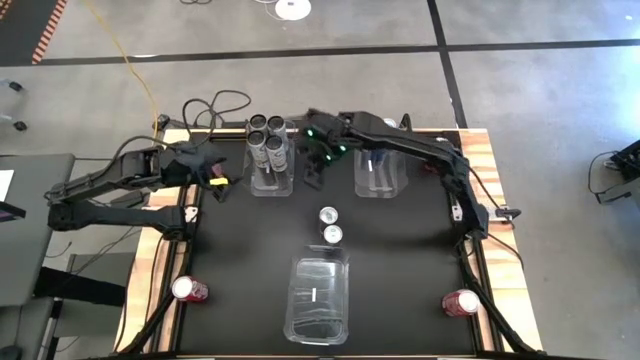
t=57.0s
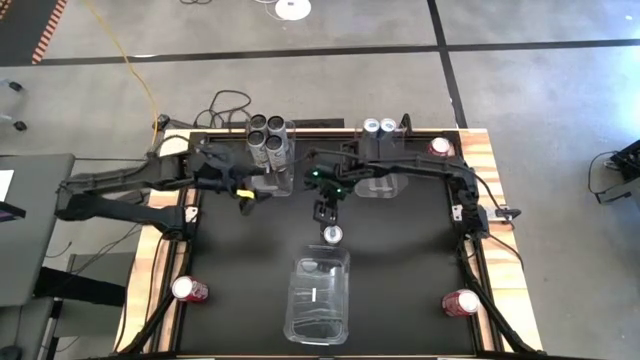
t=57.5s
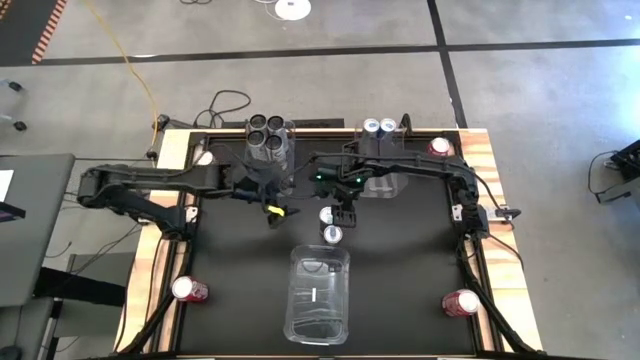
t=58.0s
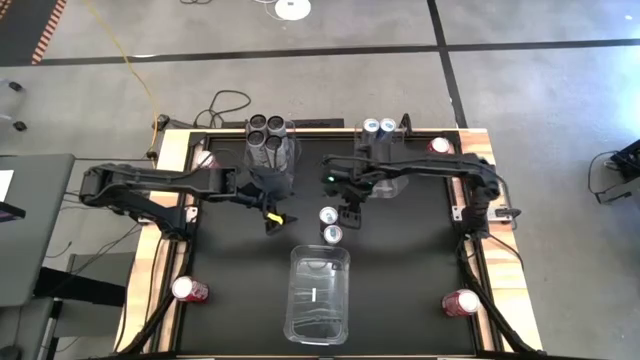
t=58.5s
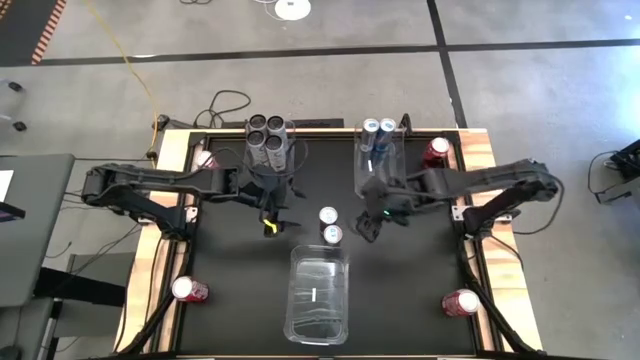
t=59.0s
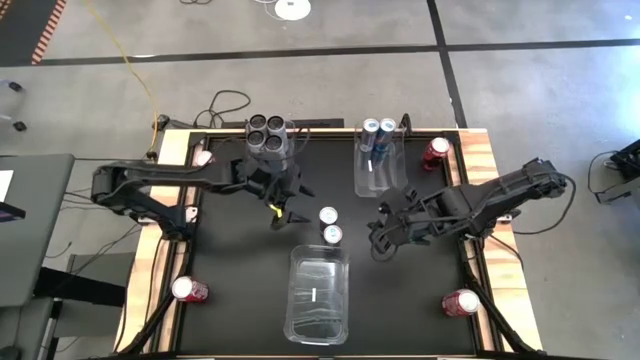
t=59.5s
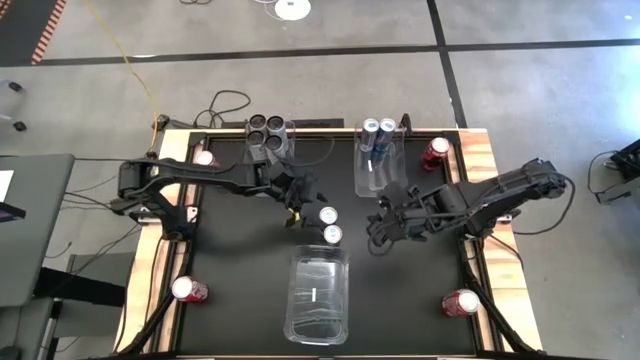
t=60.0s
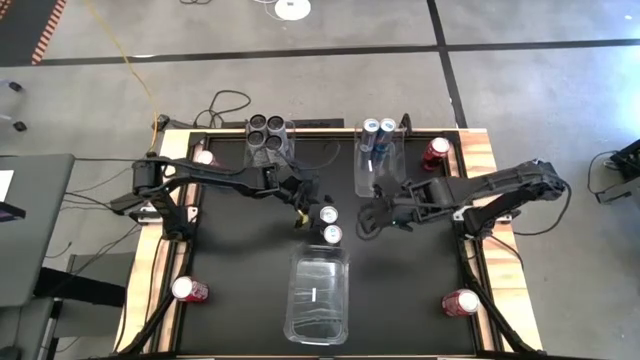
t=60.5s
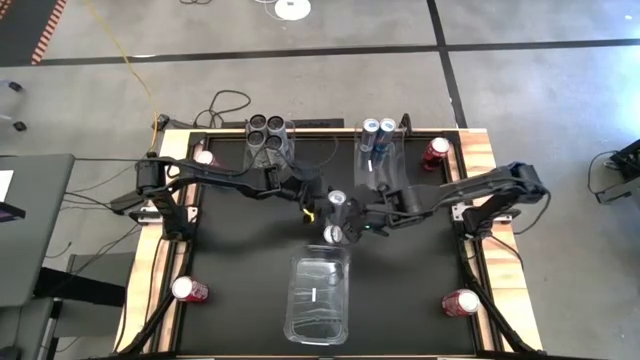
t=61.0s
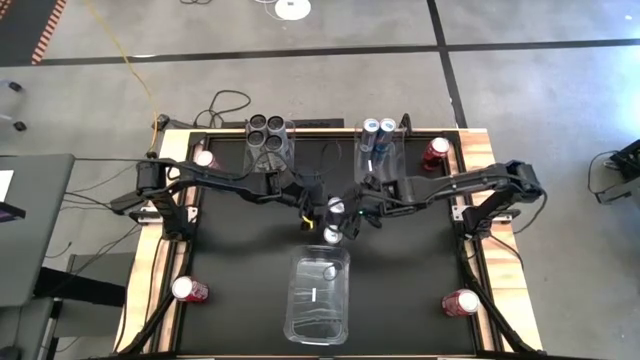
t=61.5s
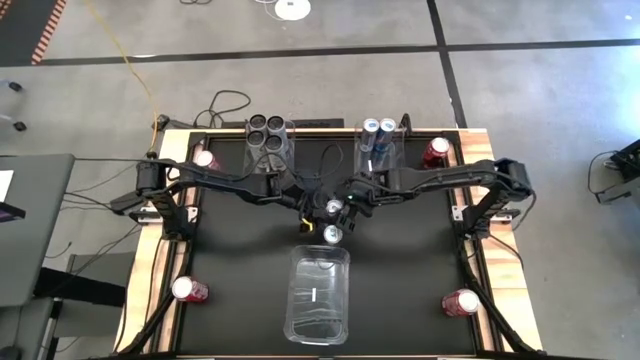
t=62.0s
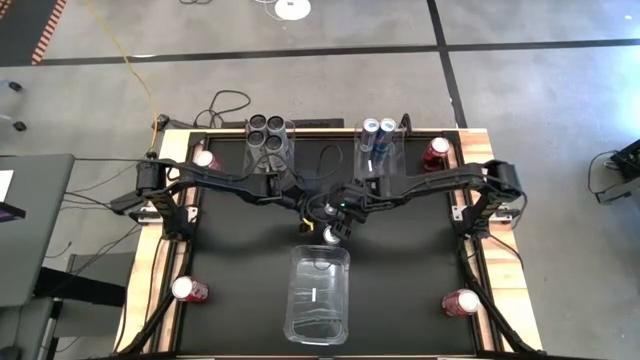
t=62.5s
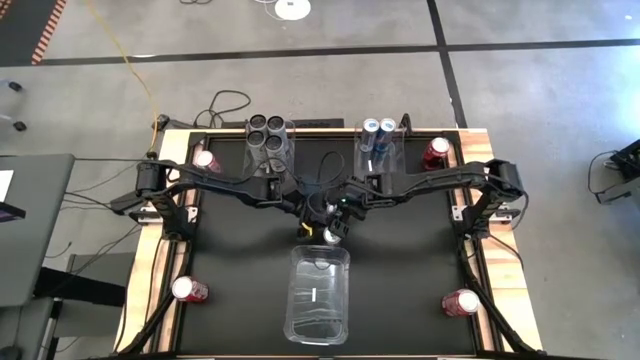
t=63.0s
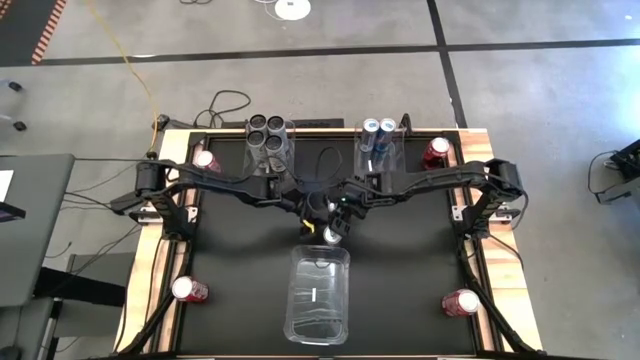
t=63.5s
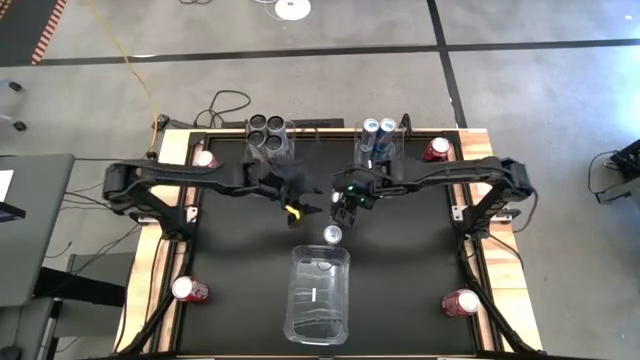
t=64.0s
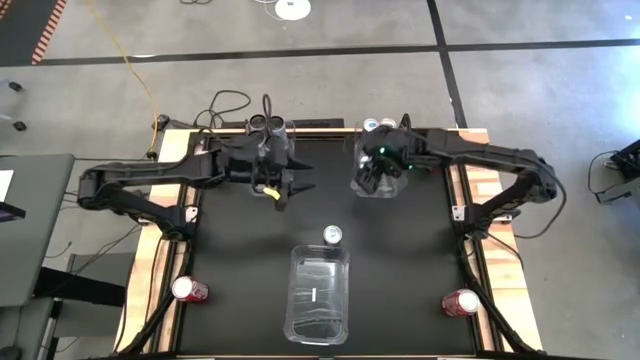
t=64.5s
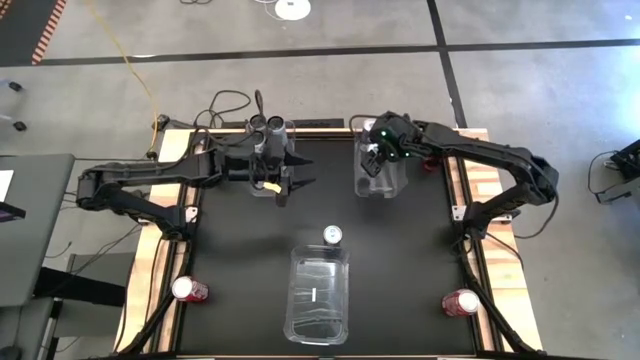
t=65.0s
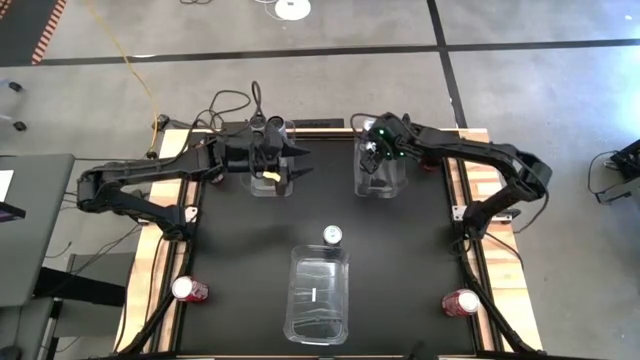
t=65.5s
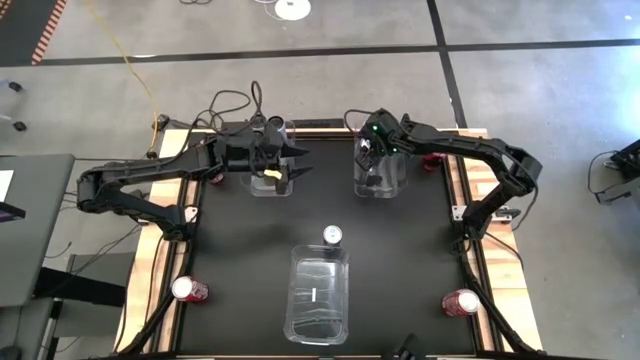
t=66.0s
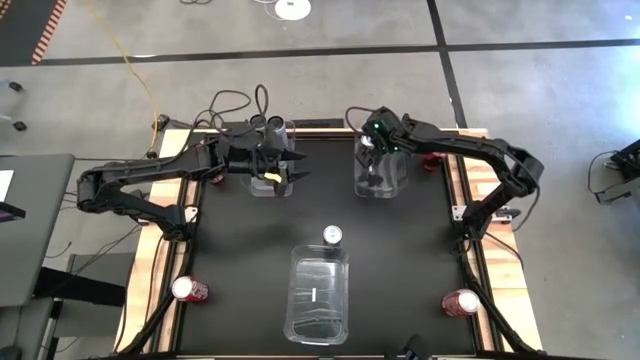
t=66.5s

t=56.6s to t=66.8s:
Task: Sort soda cans
Put the top blue soda can into the top right transparent bin

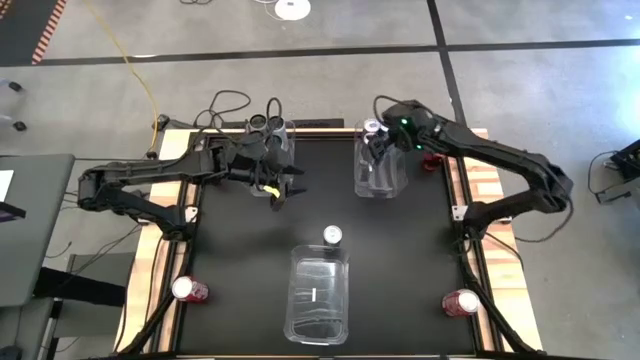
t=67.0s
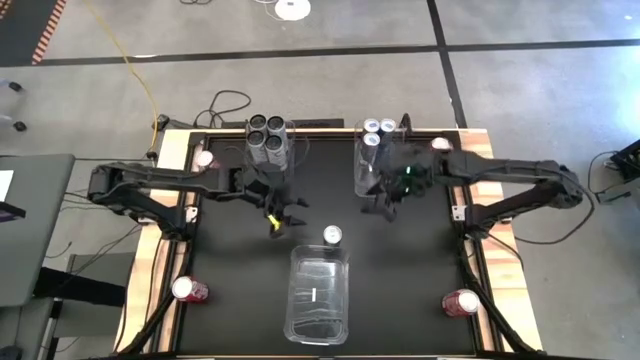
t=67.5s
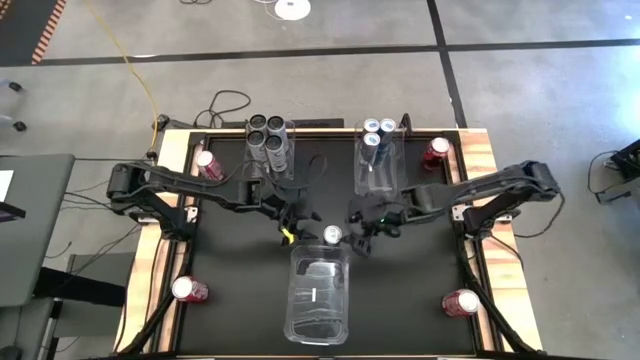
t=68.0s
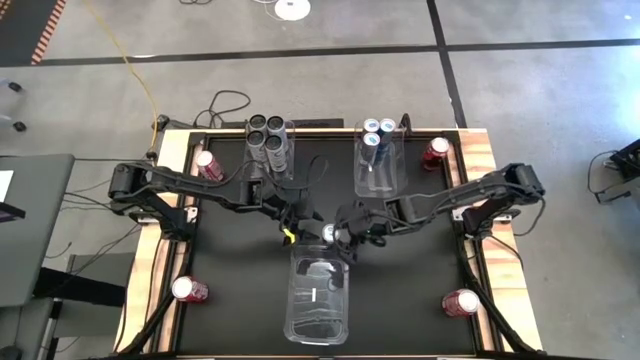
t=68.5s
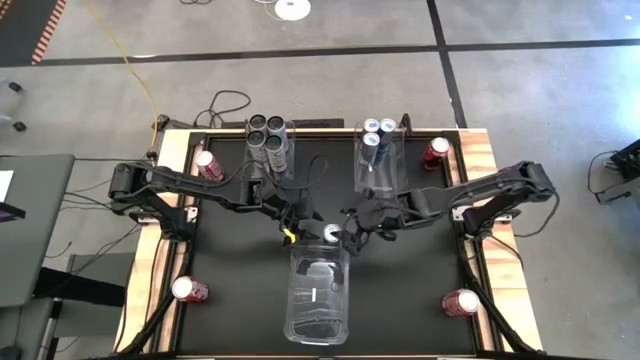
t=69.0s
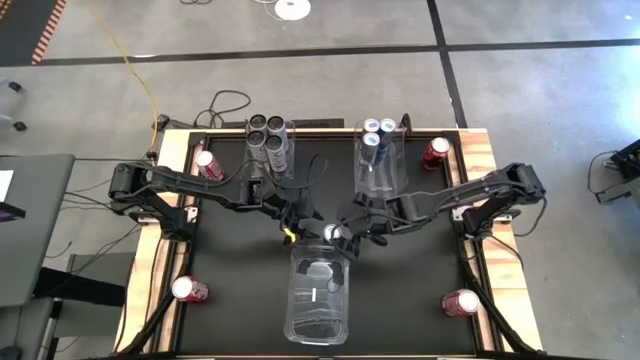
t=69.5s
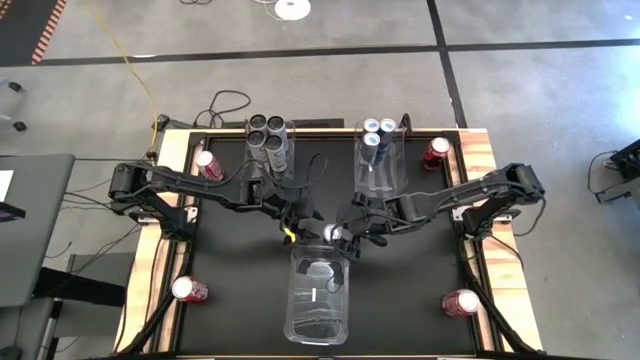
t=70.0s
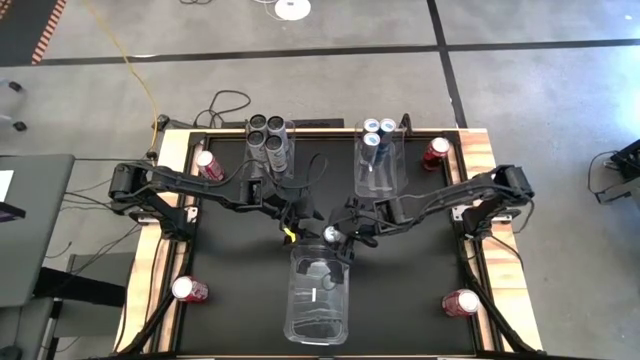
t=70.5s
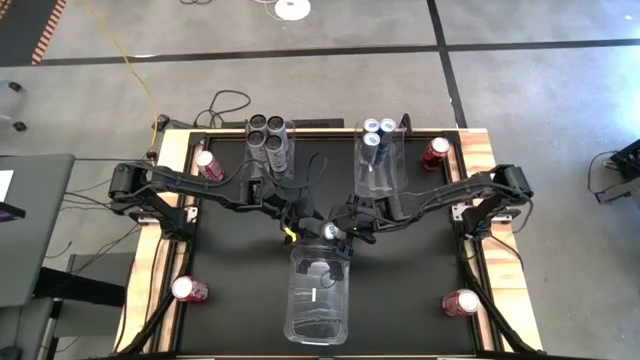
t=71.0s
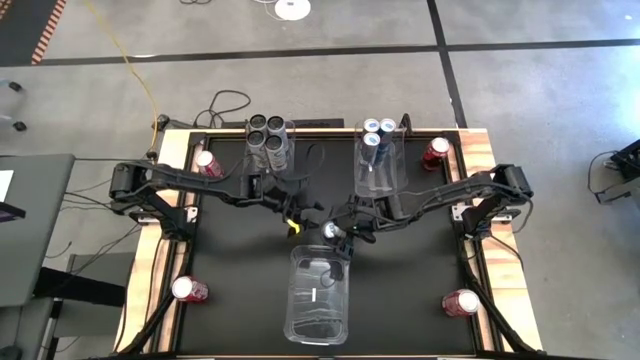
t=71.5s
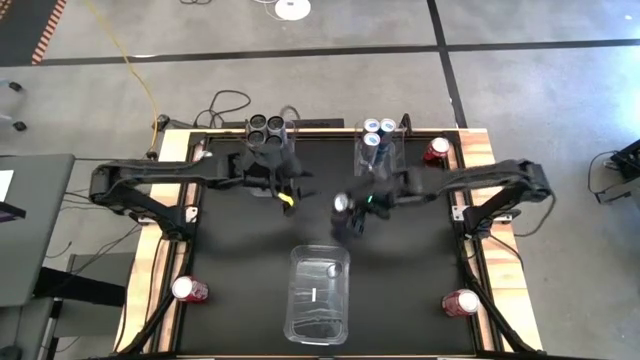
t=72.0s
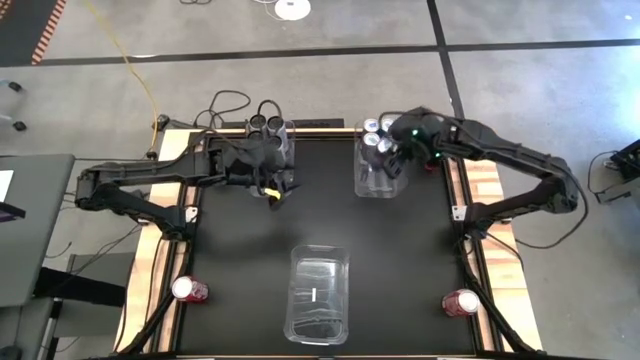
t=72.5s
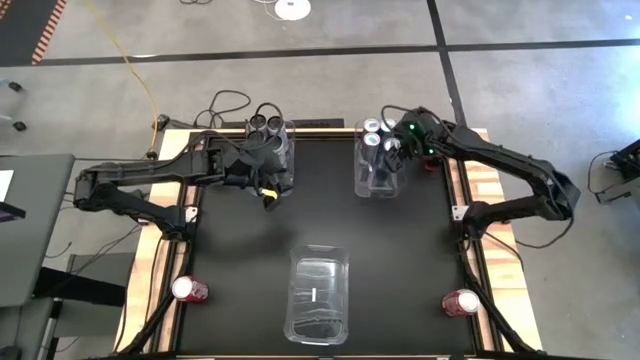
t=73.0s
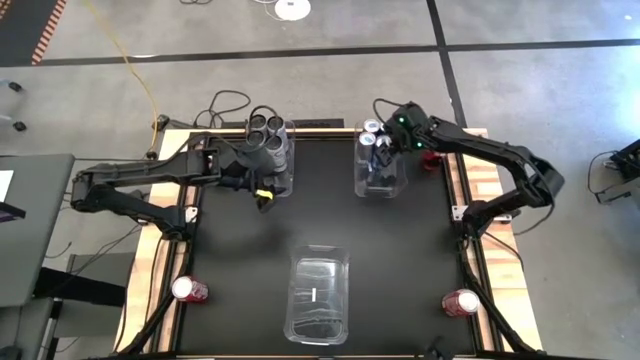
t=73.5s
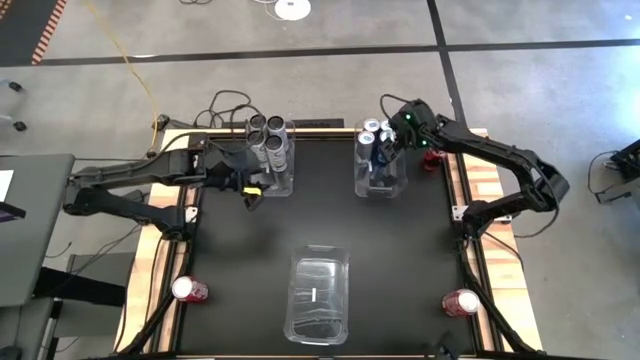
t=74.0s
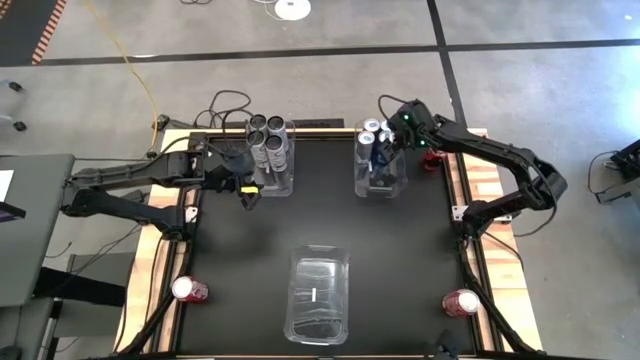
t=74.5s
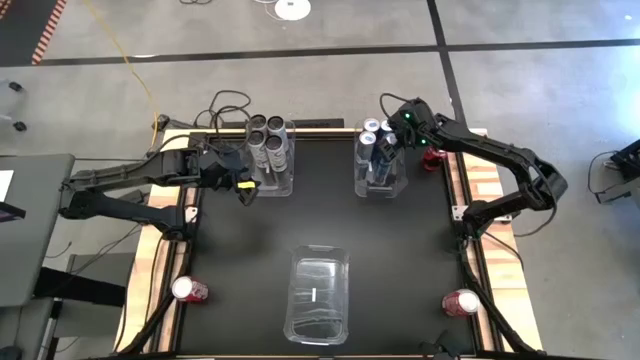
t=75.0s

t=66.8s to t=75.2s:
Put the blue soda can into the top right transparent bin

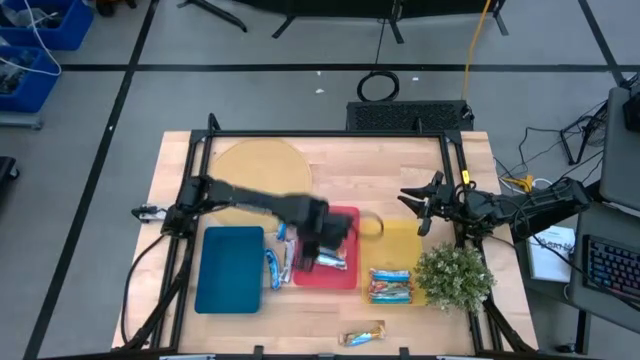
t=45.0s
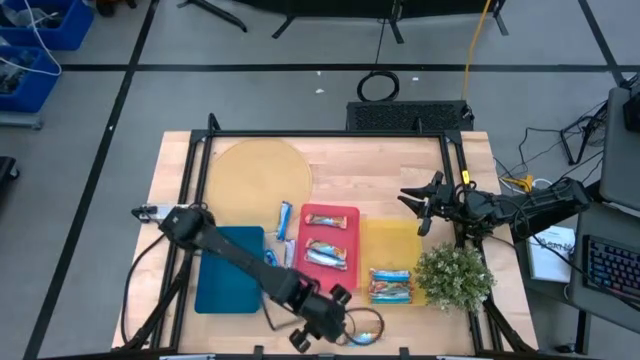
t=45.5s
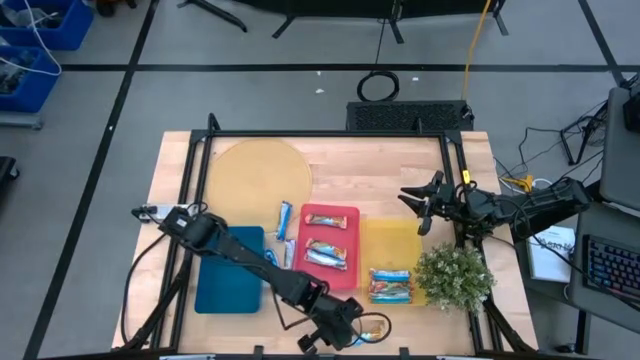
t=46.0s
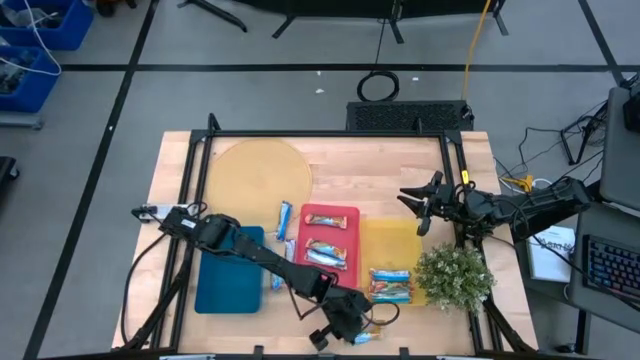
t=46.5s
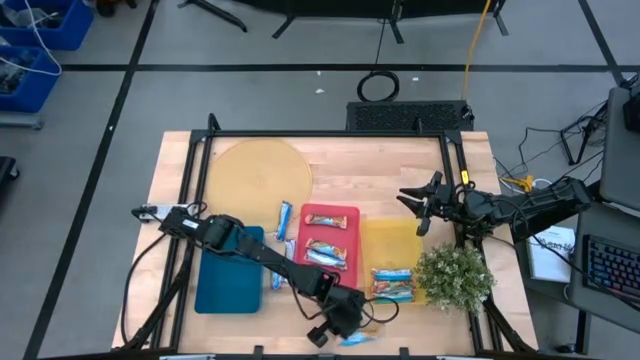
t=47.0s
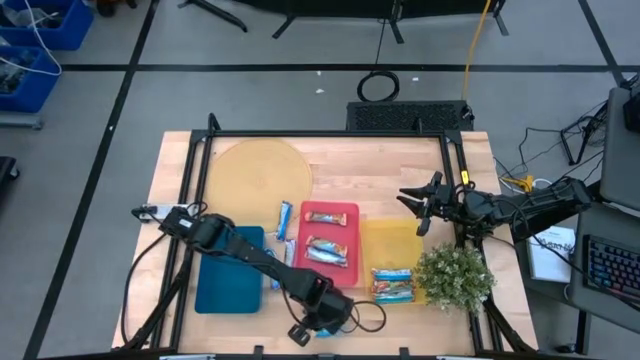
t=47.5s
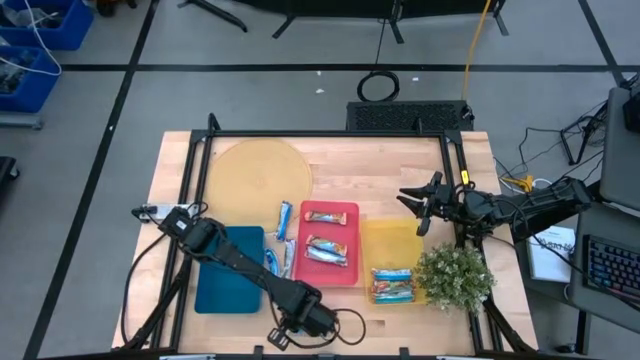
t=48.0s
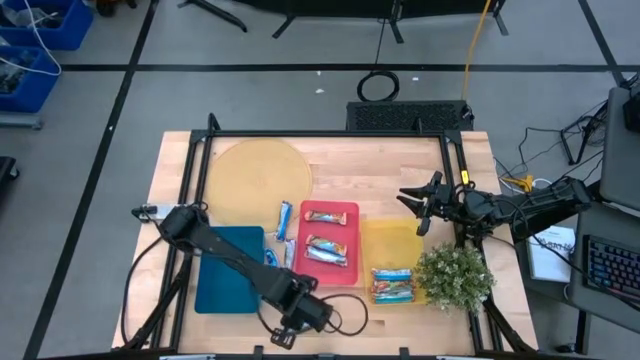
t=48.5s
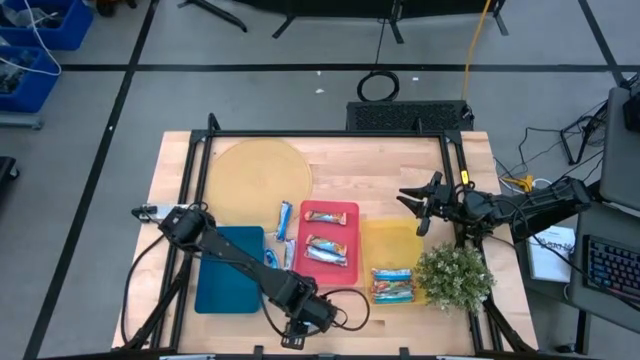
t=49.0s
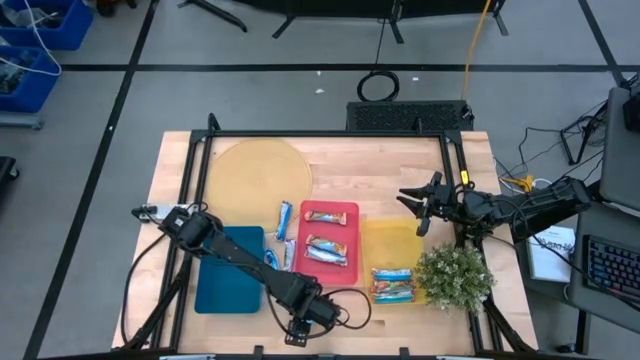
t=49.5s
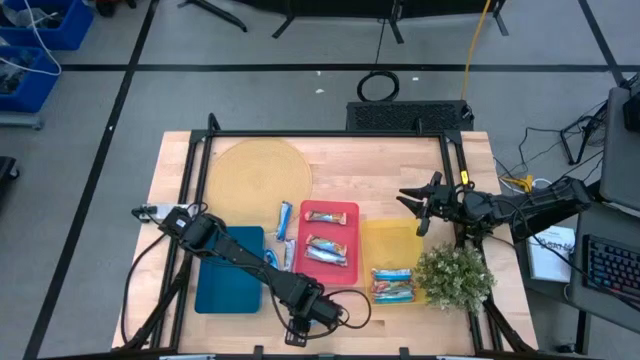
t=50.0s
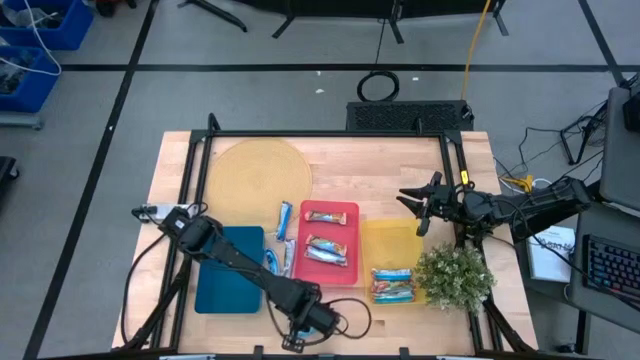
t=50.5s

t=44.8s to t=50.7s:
Task: Pick and place Granola Bars by type
Put the yellow granola bar into the red bin
